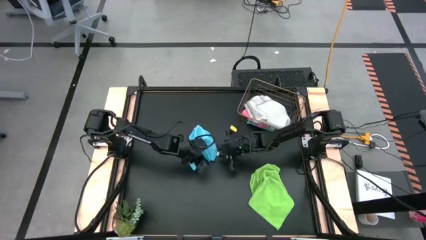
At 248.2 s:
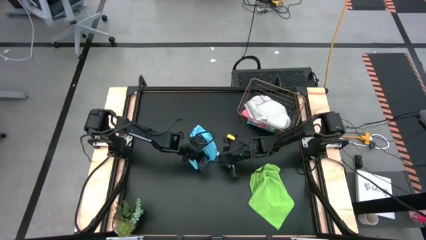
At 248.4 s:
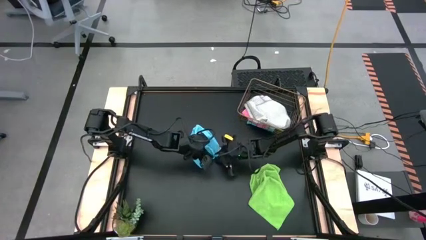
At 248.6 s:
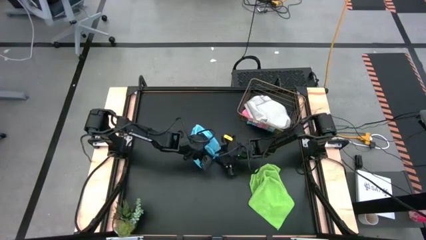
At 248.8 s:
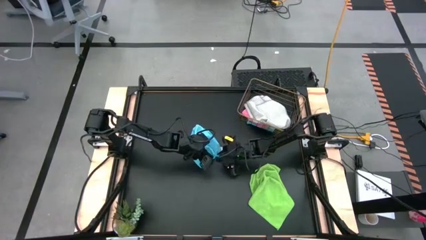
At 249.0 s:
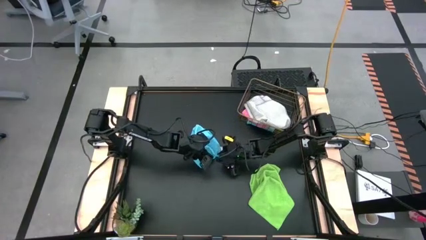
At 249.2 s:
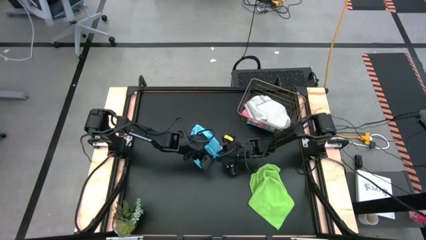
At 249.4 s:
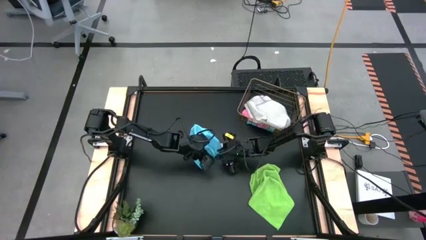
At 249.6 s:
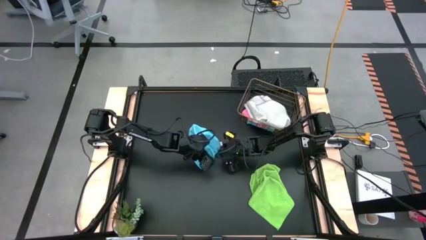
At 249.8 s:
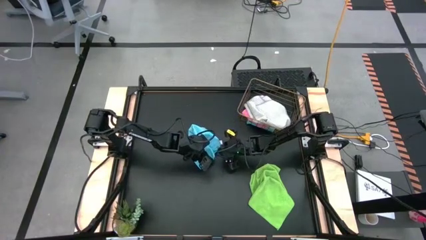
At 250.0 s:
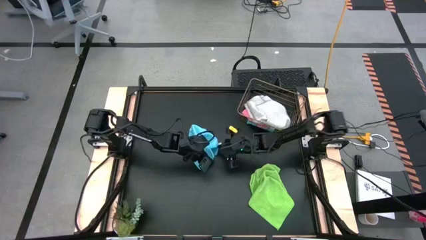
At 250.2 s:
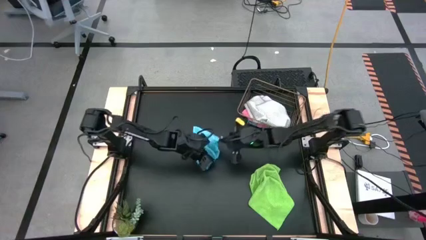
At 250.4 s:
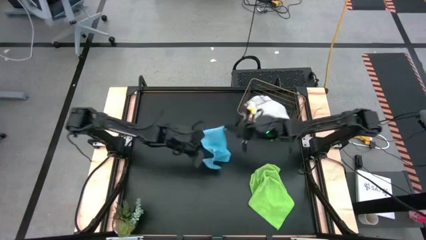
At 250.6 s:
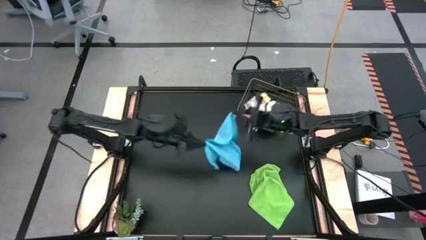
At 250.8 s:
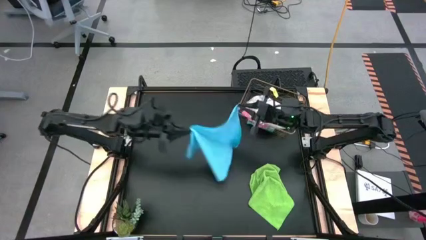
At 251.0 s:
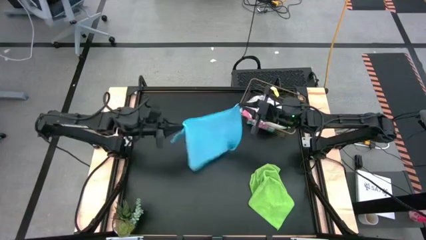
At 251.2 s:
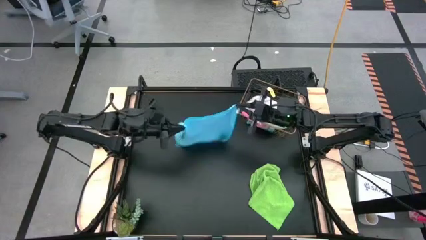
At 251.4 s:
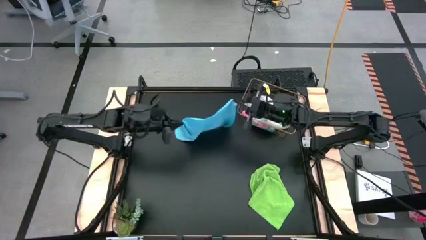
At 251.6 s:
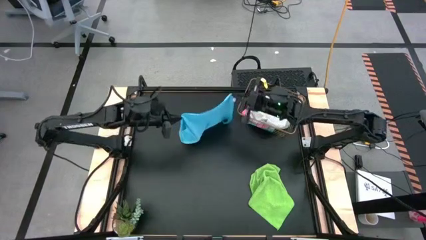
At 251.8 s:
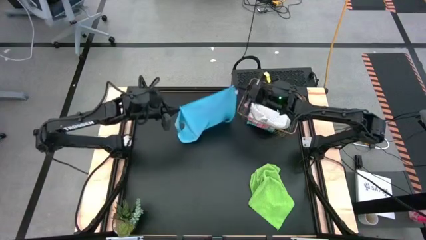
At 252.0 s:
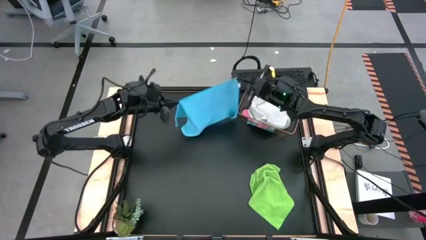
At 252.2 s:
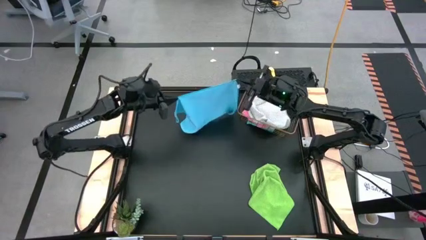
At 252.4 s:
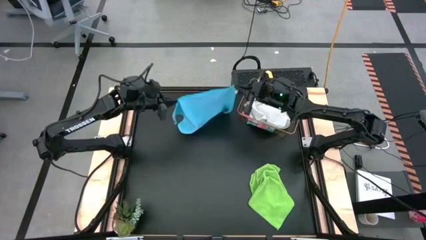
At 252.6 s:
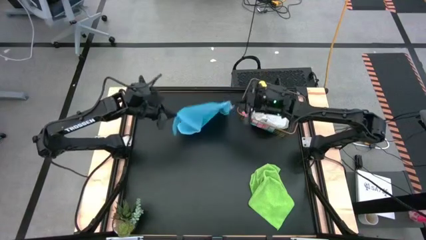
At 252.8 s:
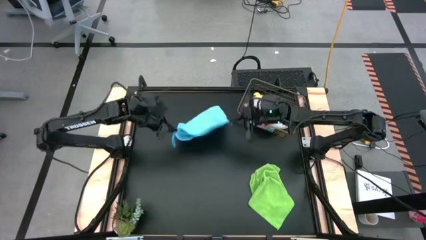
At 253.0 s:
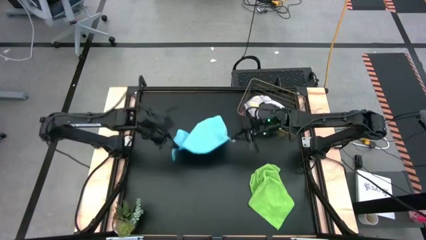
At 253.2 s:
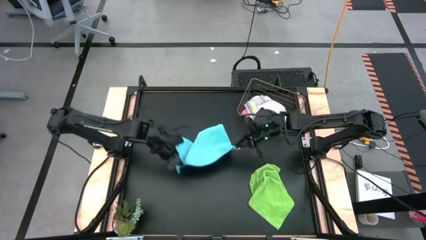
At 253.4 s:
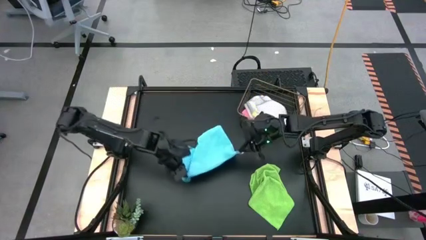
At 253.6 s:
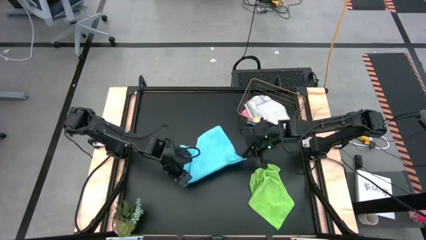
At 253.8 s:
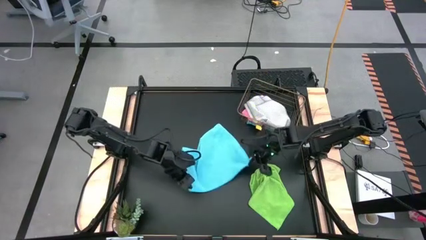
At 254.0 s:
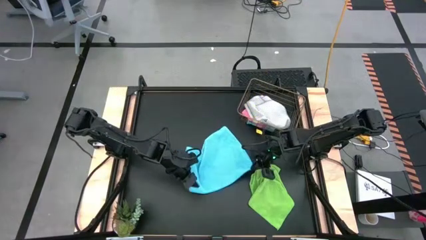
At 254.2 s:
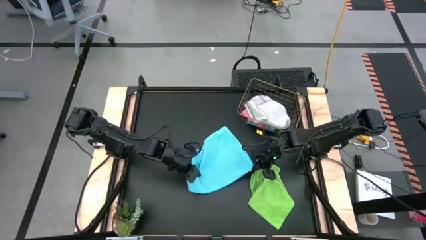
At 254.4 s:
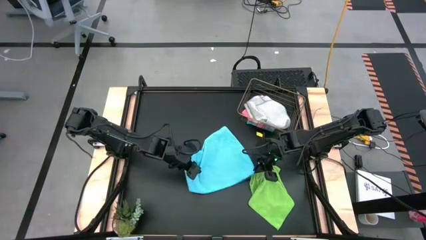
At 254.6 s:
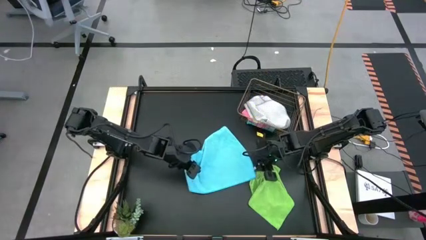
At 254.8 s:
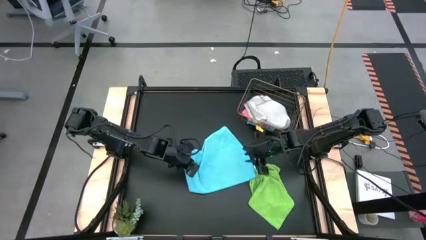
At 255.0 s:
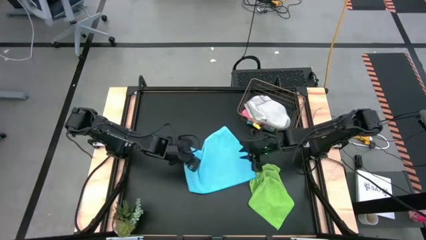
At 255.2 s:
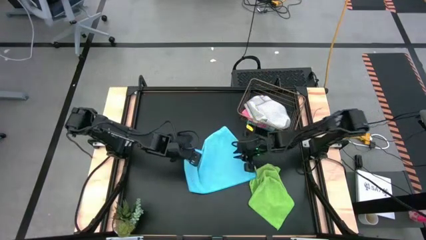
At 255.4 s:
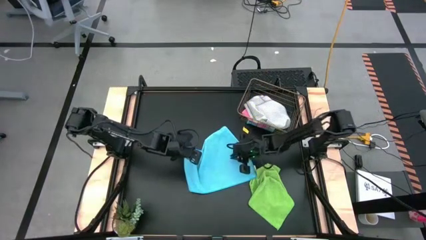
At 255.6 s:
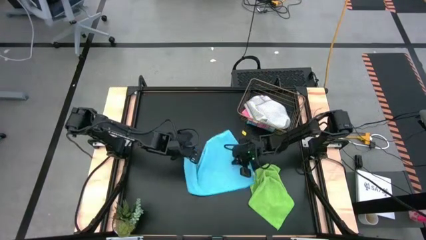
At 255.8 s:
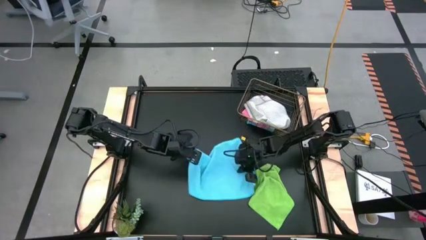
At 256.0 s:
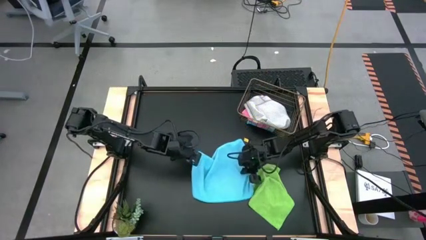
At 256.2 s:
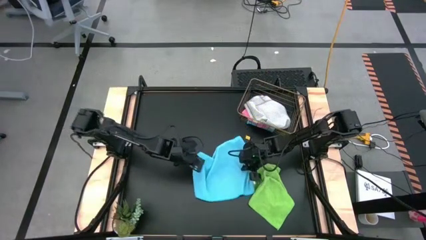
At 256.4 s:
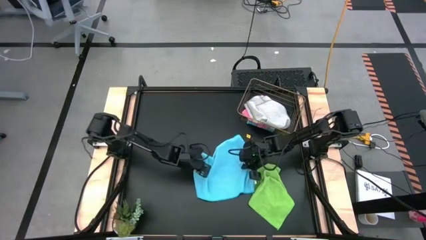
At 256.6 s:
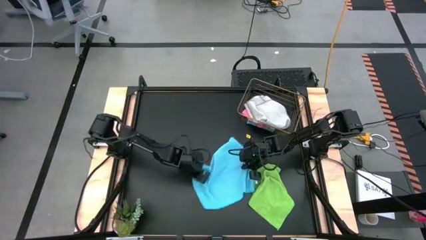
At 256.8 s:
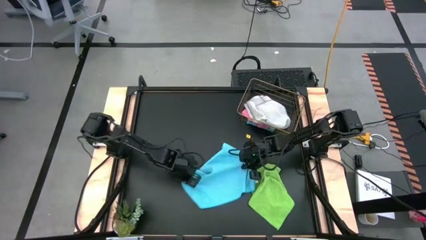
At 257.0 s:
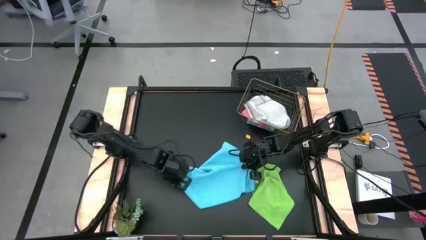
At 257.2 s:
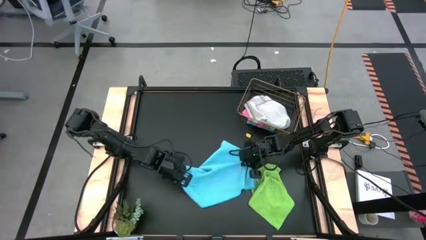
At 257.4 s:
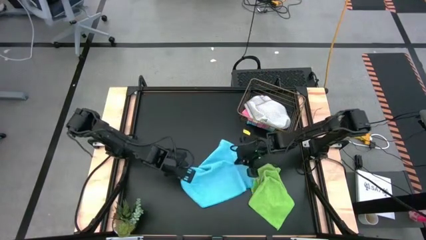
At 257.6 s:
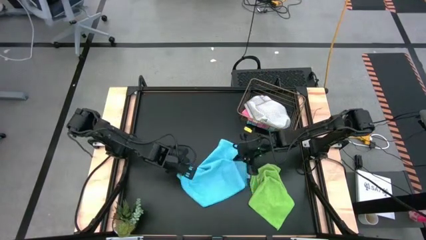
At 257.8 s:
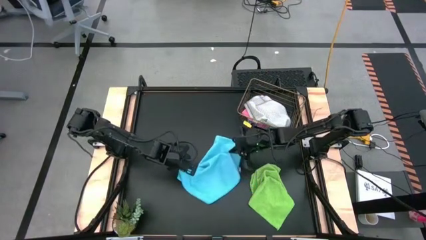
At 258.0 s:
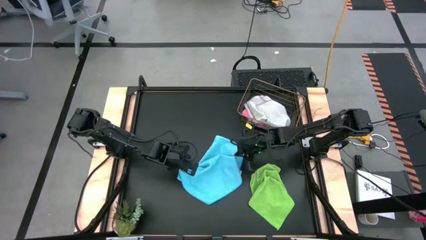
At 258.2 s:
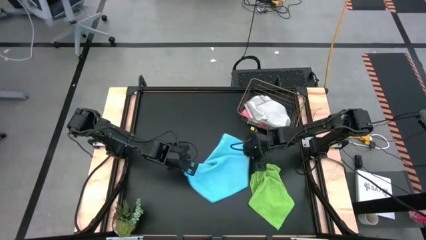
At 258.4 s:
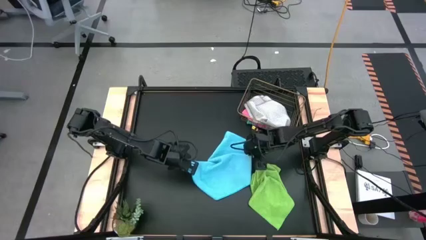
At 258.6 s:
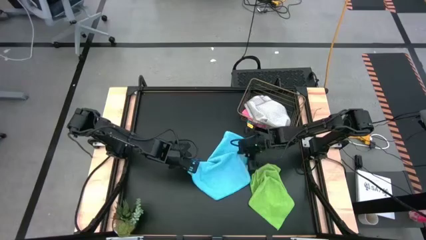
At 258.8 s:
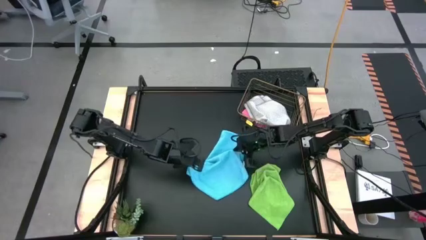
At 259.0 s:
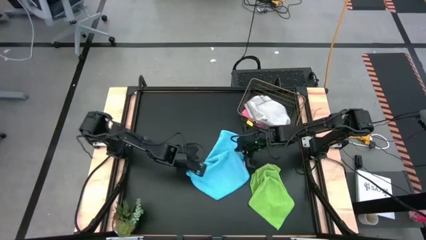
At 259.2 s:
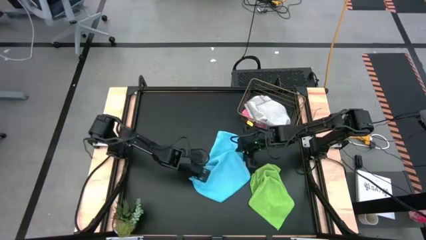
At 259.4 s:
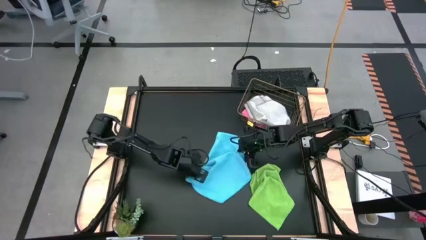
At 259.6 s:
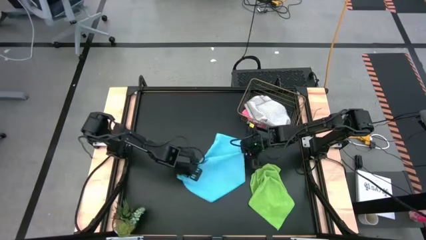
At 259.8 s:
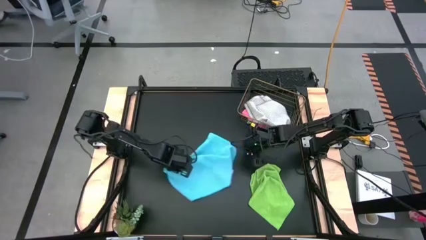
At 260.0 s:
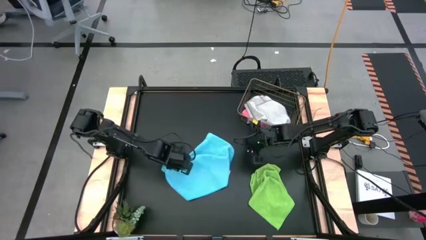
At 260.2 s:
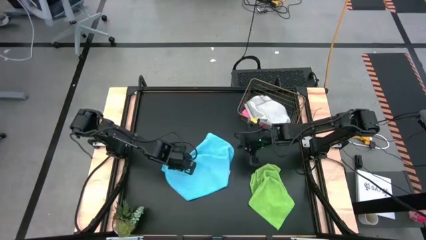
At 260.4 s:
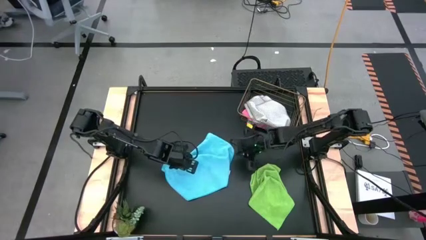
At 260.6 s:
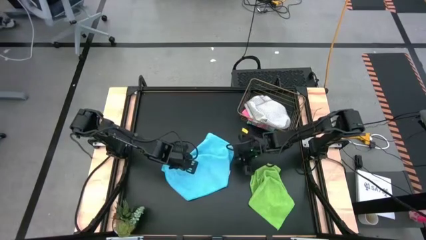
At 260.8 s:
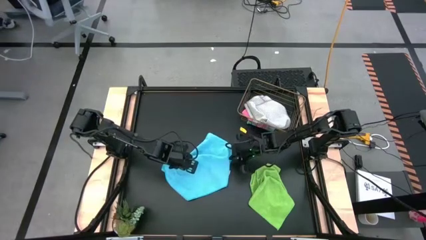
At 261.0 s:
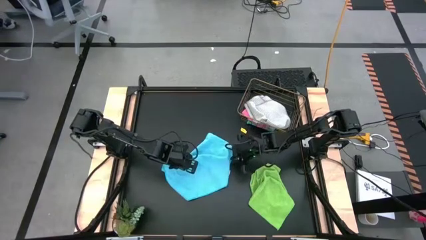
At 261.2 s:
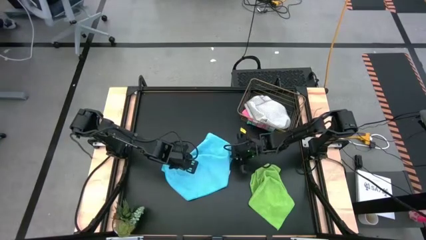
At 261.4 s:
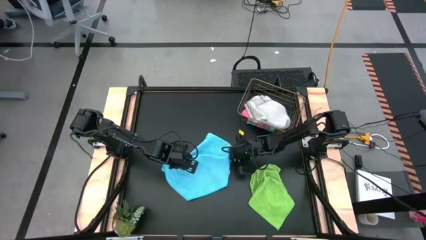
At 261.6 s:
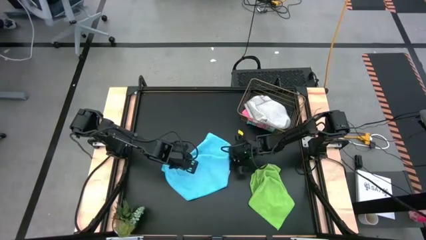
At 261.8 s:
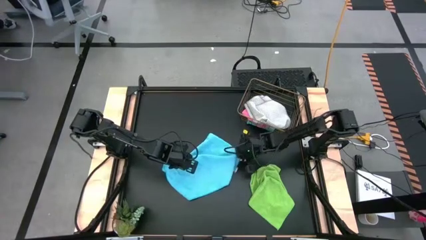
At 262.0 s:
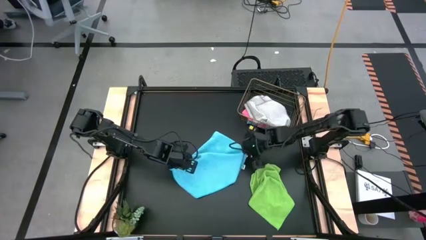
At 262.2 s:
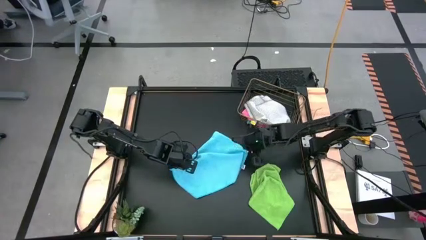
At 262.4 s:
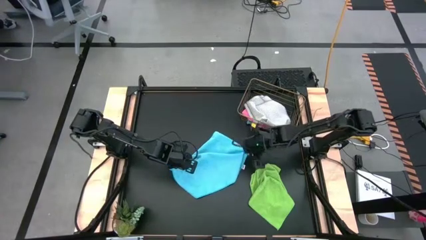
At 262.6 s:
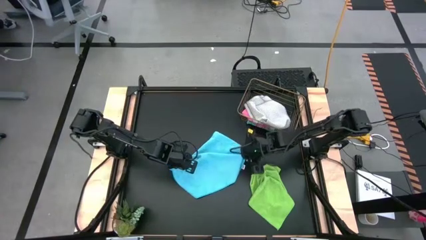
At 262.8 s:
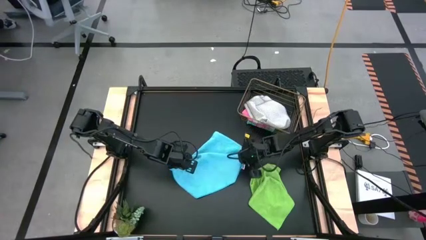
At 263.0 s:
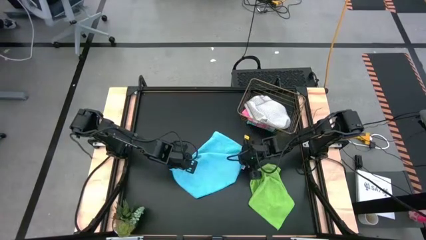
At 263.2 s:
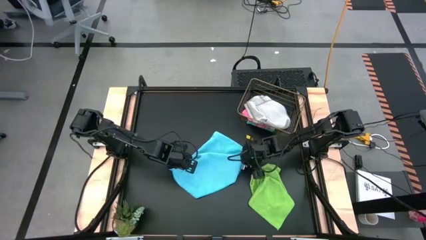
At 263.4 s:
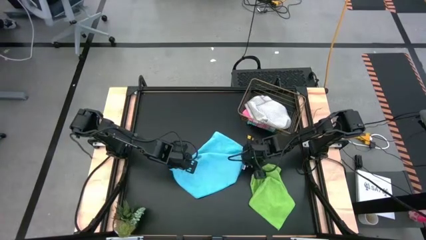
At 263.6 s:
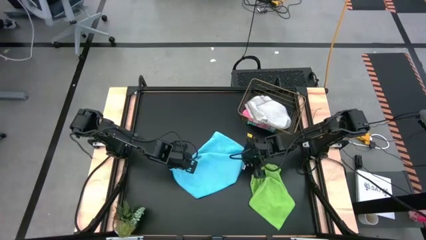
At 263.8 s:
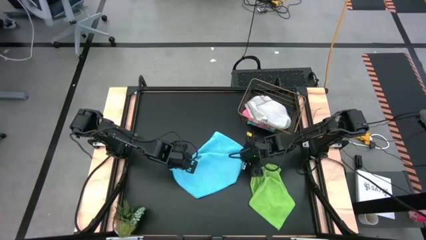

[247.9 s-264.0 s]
Task: Fold microfiber towels
Fold the blue towel

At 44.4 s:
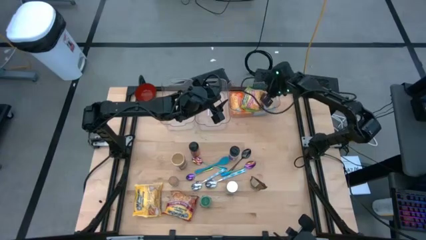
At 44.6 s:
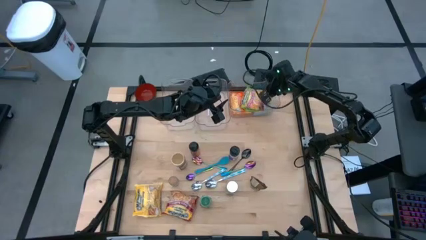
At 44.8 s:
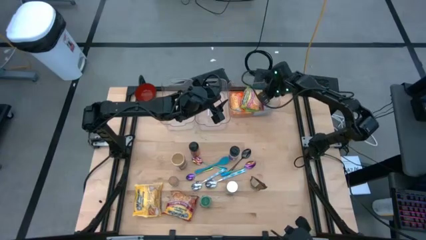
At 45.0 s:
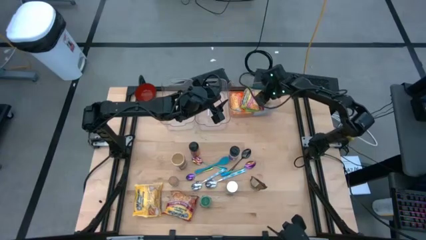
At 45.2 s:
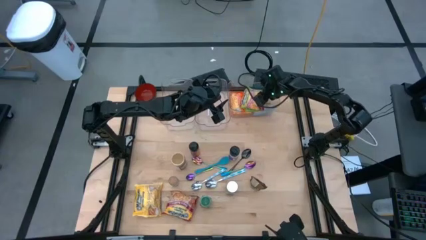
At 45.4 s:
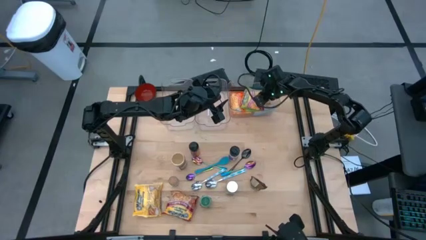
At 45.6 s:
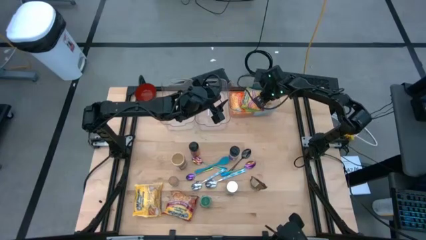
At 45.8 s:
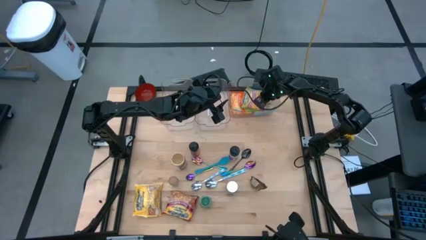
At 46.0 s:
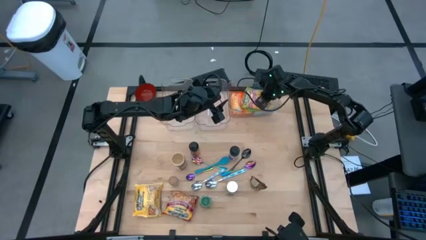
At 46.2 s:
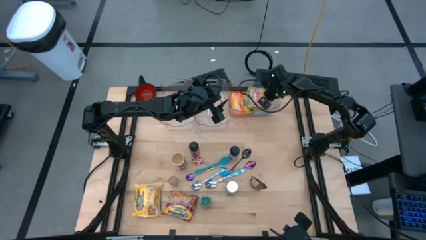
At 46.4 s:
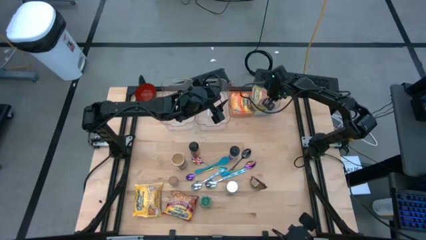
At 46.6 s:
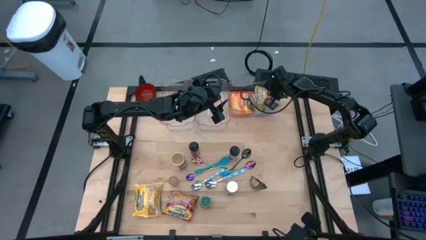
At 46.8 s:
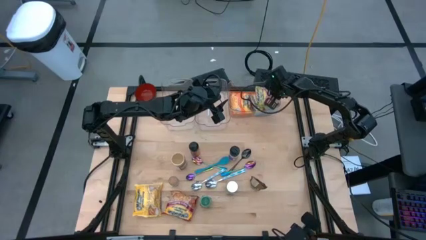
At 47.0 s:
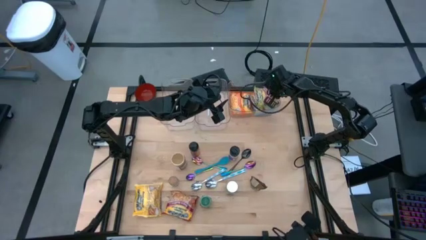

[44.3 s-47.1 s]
Task: Pick & Place Food Item
Put the green noodle pack into the right transparent bin
